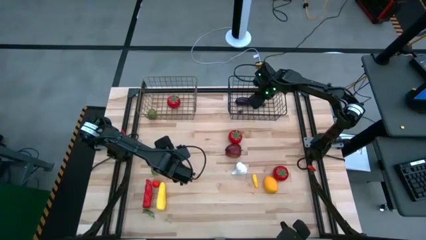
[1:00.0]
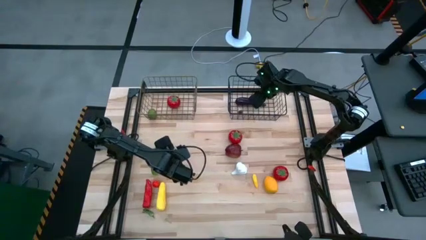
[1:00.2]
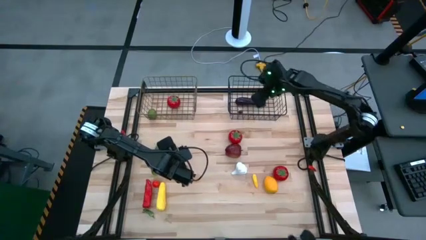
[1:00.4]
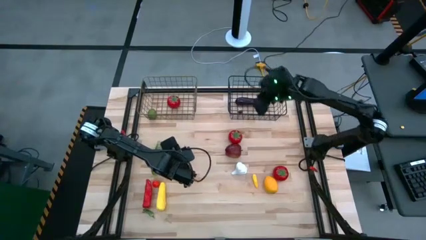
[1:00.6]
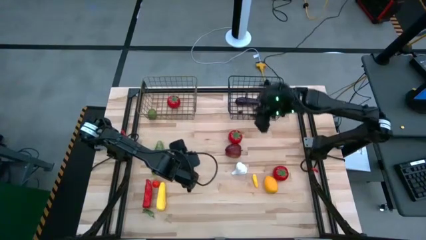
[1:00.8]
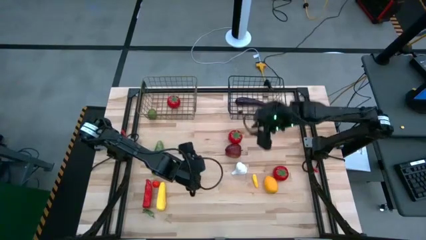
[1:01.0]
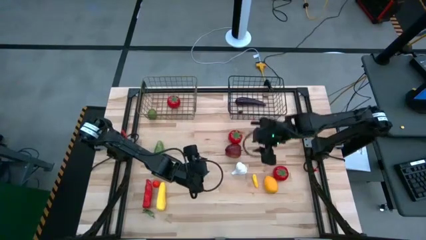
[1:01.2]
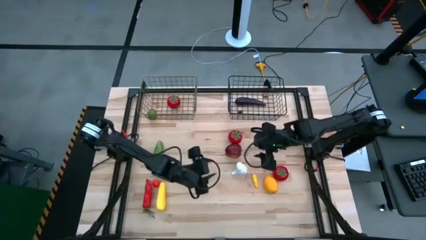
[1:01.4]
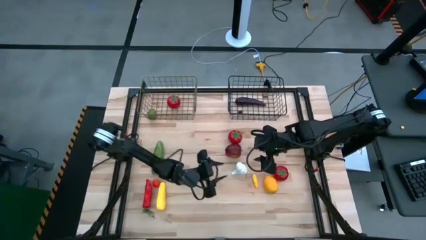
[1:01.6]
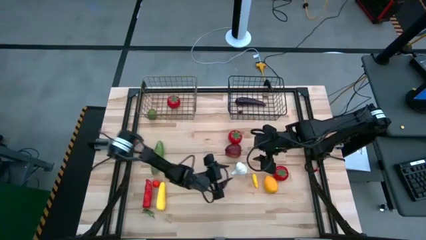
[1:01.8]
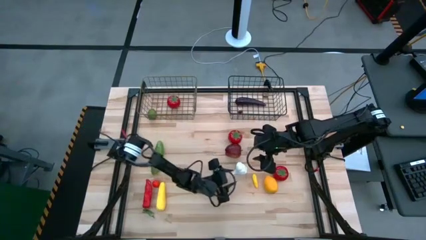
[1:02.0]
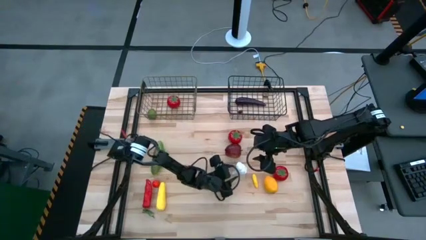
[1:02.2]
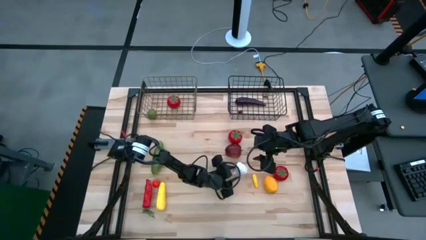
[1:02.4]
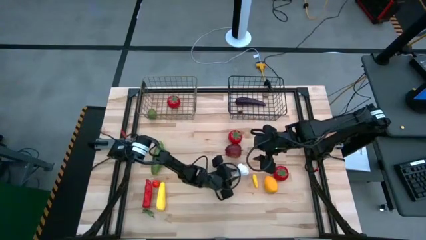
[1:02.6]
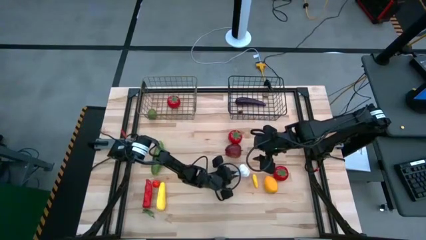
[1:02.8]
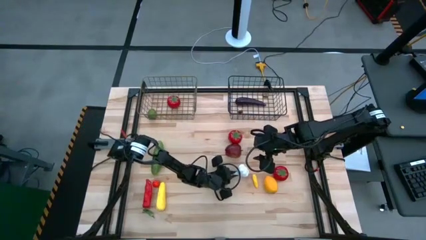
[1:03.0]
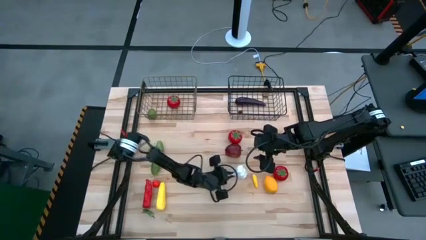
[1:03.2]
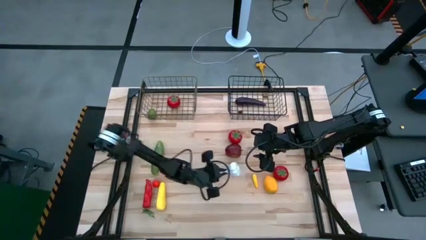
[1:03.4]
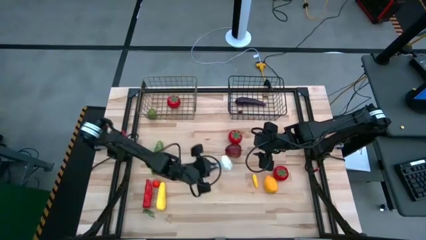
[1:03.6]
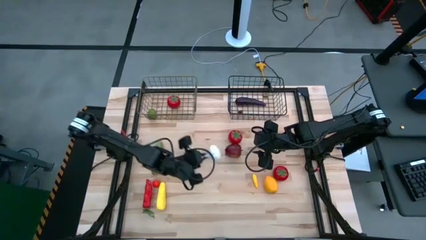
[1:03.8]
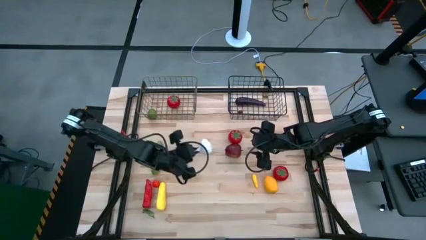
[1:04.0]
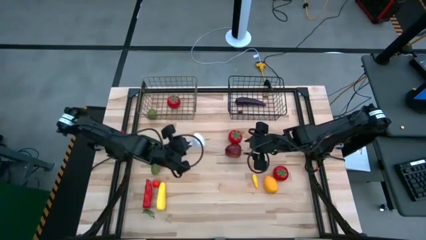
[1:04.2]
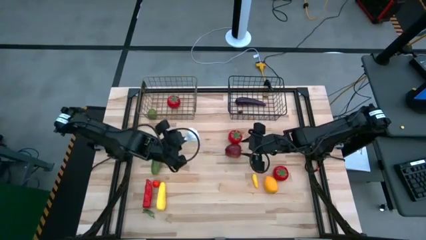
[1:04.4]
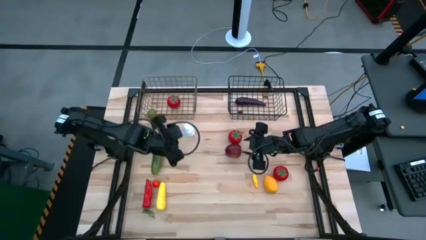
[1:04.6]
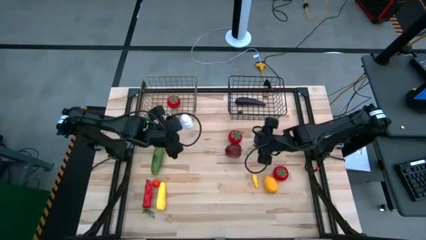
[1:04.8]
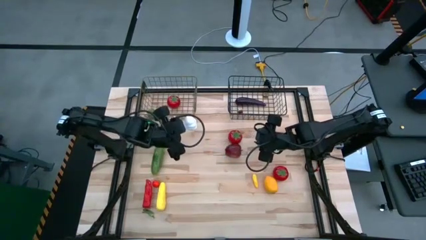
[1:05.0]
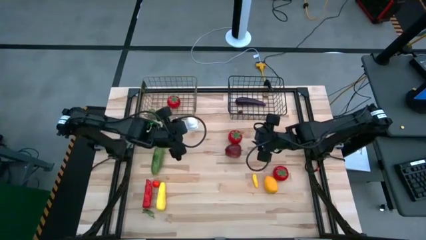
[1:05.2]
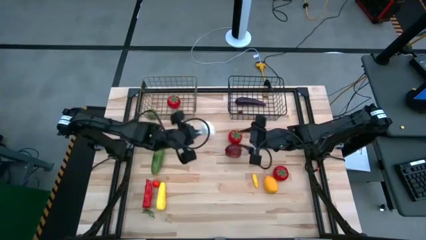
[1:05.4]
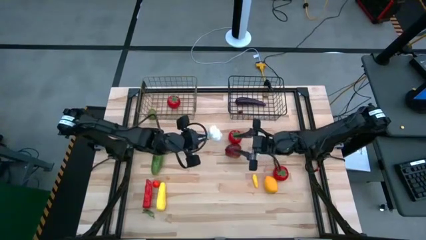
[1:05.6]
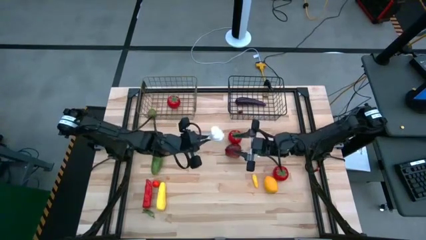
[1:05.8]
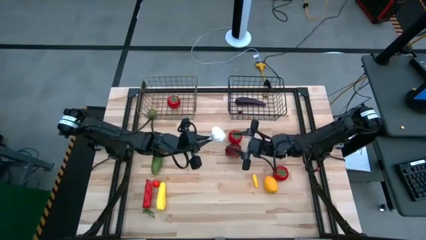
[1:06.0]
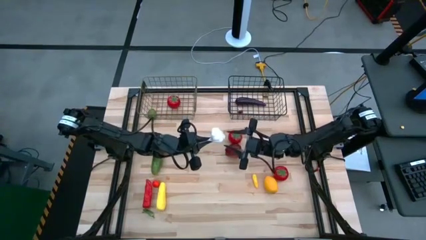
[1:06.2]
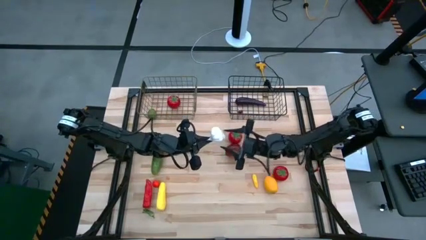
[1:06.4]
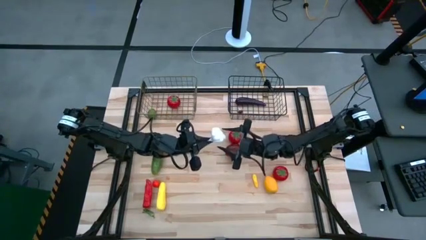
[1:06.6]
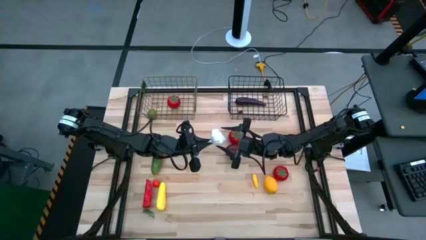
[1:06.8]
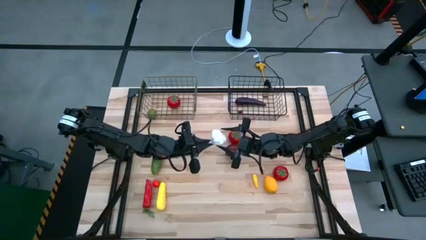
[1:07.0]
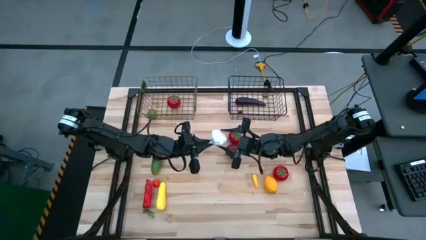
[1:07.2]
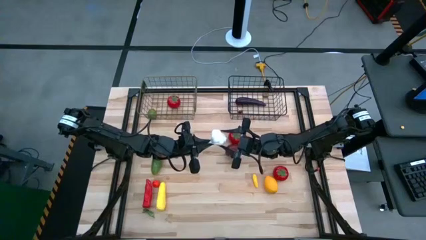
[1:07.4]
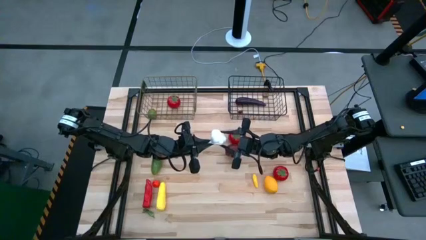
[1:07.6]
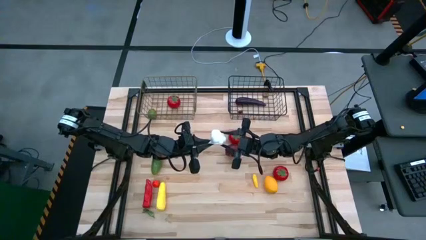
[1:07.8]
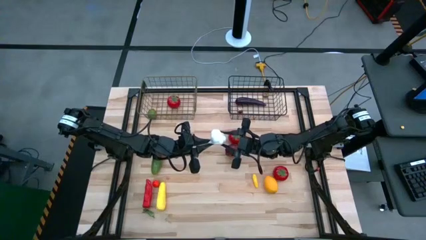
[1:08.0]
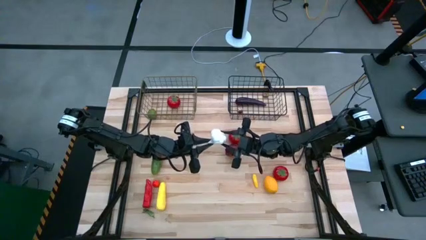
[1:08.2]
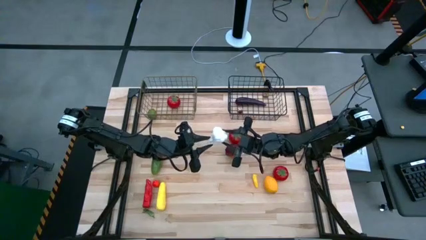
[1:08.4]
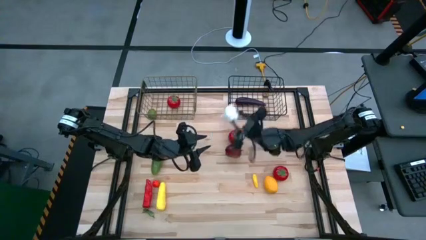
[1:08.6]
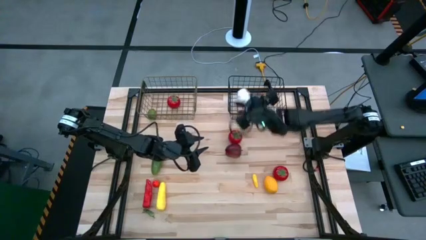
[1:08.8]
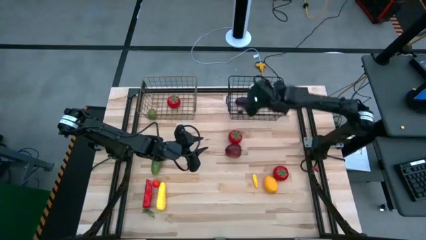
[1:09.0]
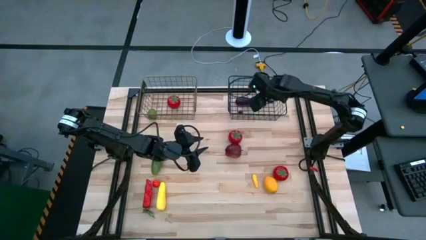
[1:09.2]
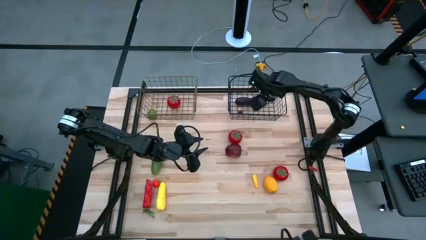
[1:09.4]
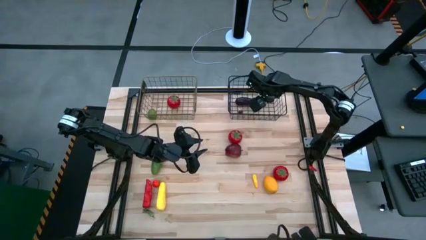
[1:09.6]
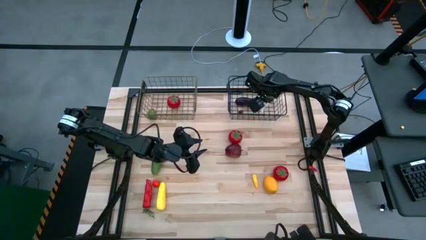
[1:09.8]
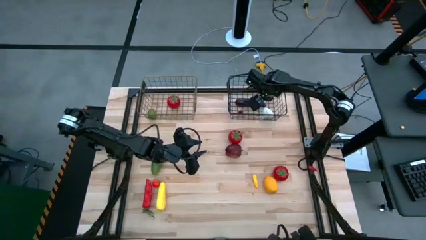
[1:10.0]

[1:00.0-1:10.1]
Task: Sort produce into baskets
Put the onion into the right wire basket

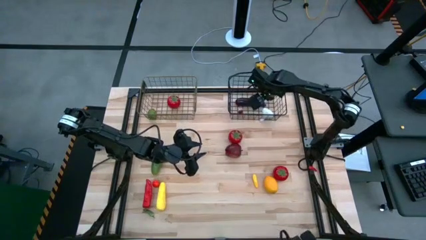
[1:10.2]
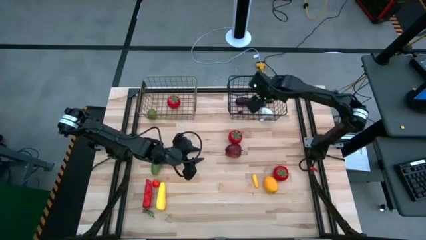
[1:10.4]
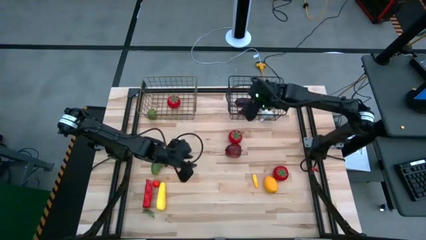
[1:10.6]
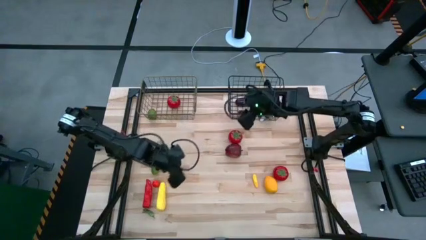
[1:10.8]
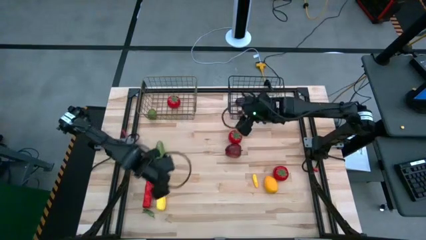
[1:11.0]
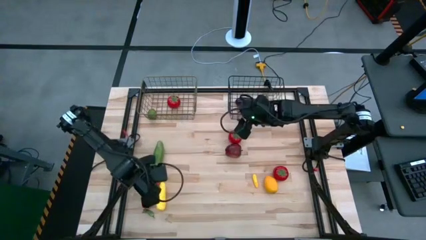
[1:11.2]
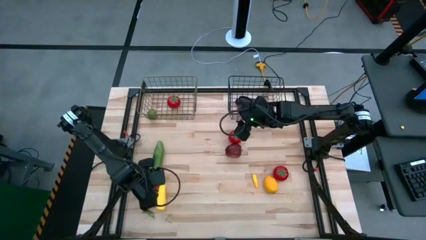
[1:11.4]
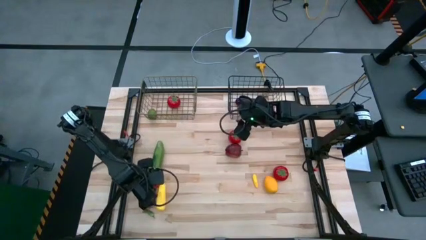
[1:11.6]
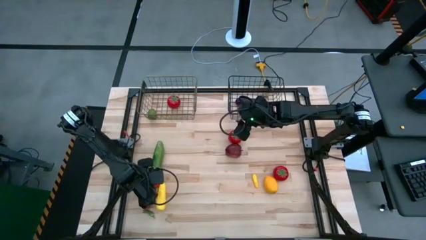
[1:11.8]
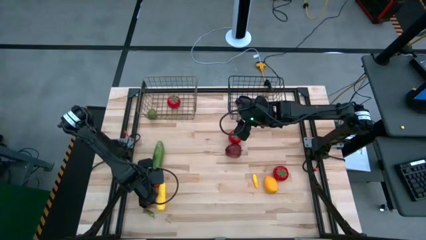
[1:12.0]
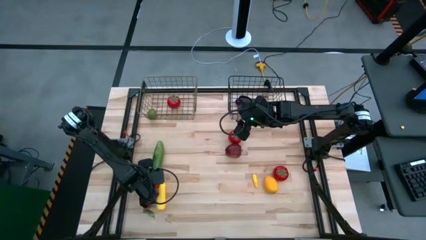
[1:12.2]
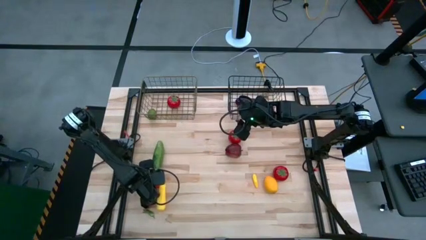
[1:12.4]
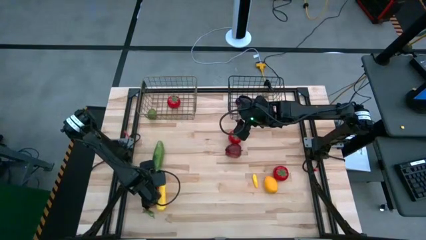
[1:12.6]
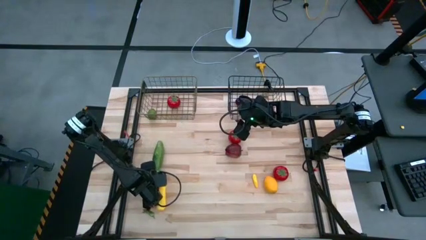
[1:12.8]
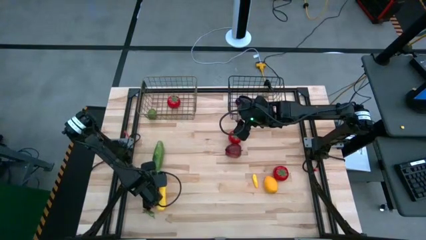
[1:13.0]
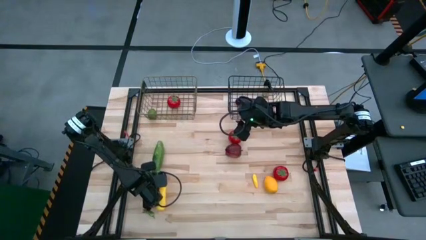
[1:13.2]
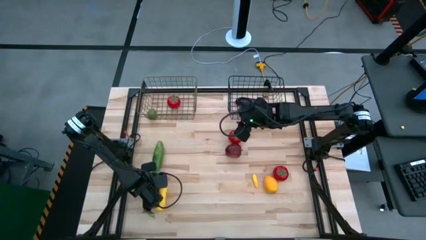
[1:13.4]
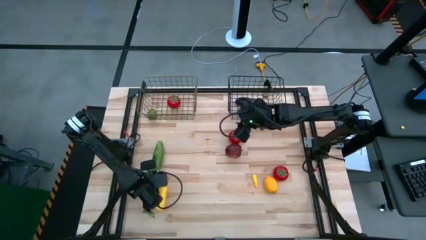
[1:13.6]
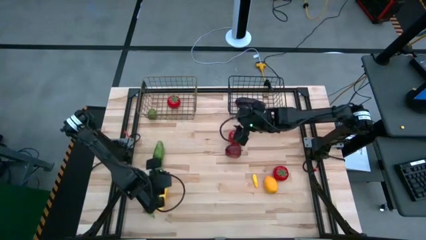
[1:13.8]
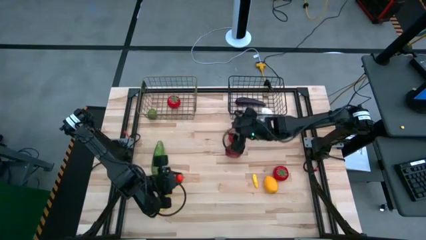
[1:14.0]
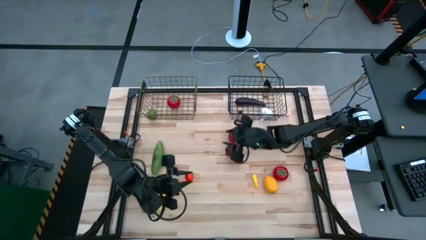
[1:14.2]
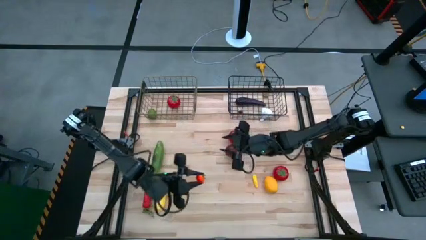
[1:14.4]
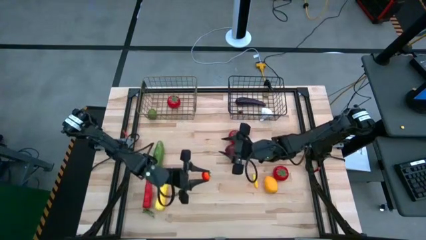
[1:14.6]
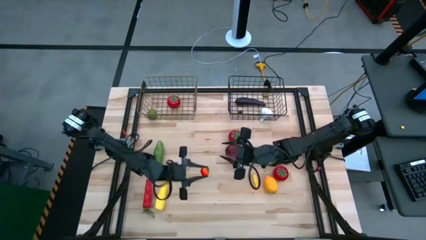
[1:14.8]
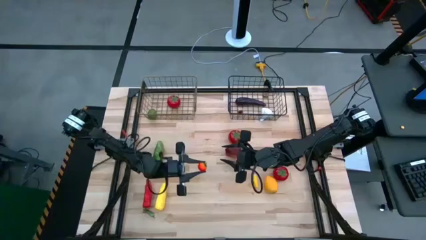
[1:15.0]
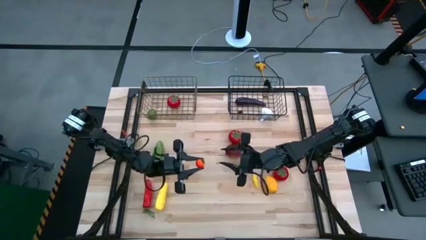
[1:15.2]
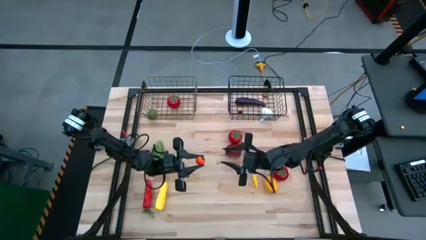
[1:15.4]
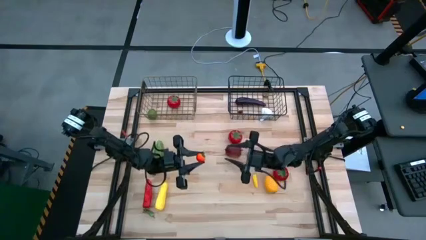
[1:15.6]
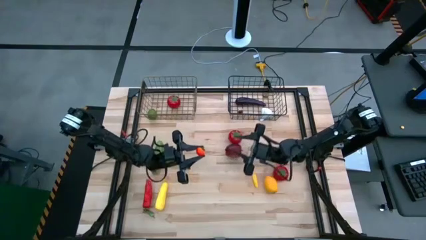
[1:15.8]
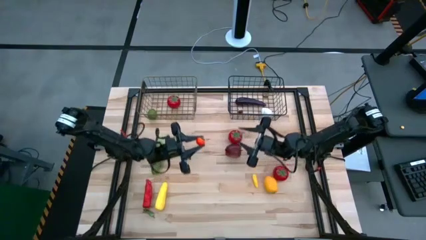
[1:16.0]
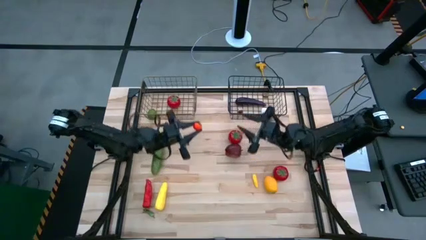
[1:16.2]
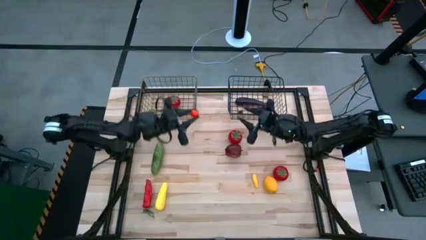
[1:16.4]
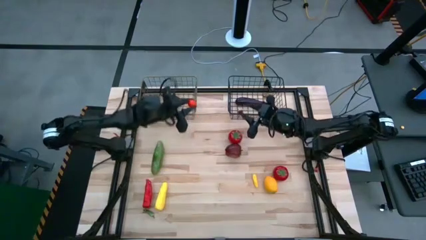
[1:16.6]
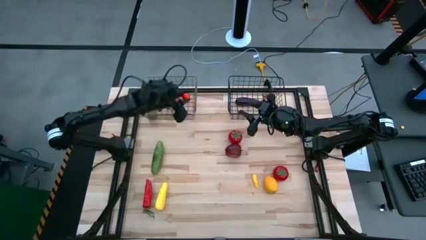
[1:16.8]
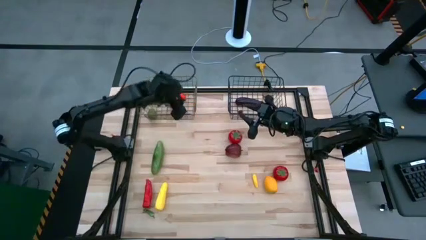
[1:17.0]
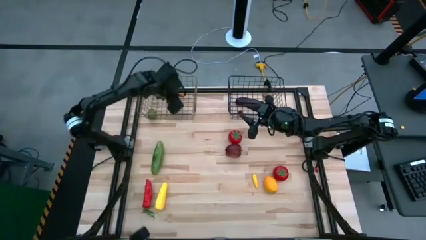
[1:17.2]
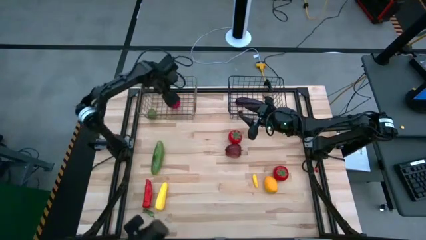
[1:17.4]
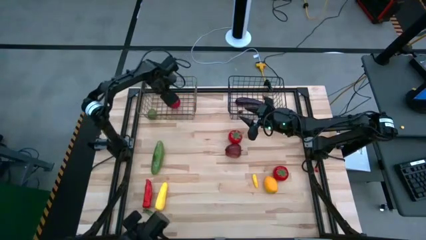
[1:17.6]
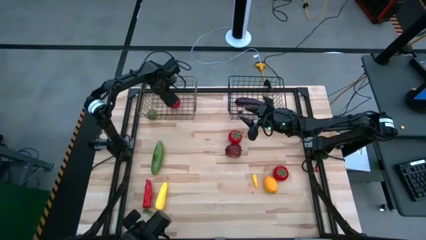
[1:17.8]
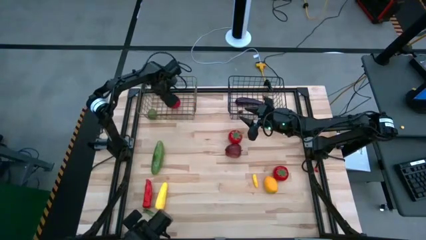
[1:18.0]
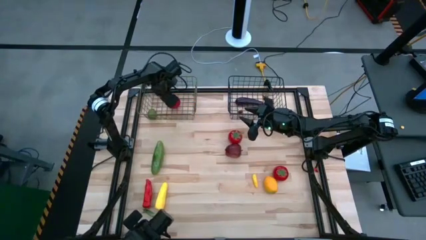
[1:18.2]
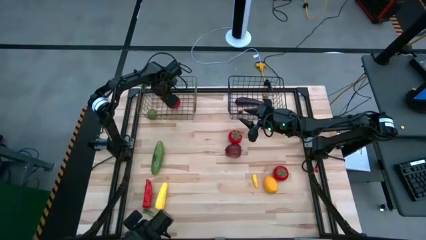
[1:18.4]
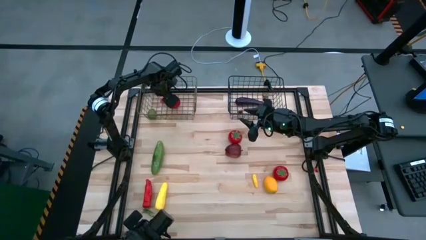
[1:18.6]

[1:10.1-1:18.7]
Put the small tomato into the left wire basket
